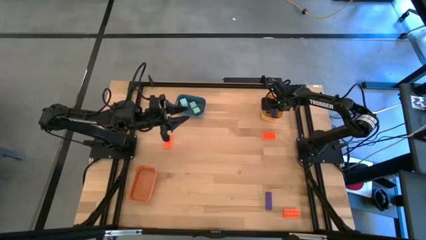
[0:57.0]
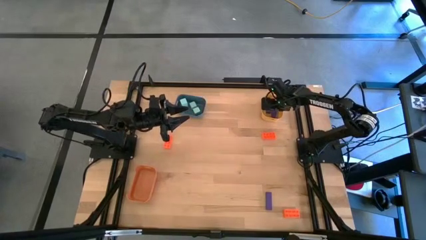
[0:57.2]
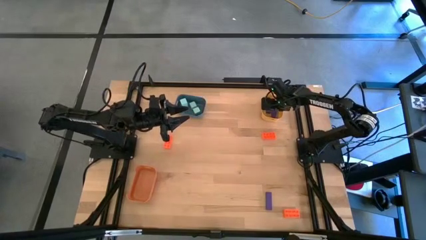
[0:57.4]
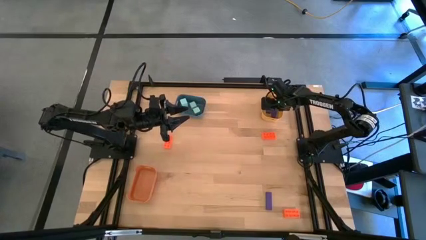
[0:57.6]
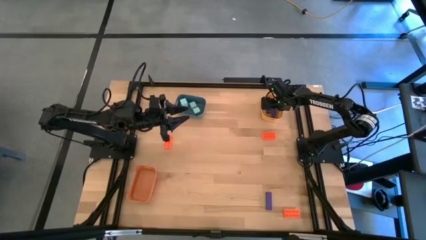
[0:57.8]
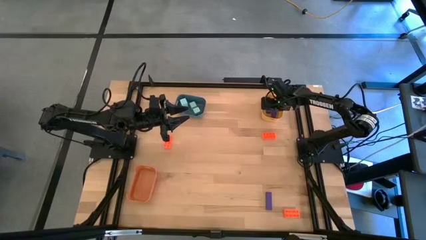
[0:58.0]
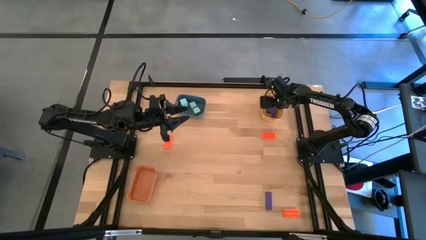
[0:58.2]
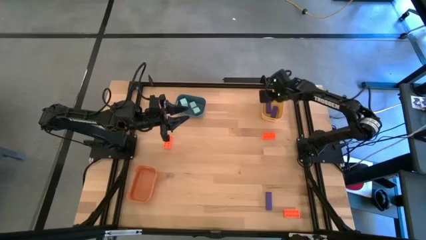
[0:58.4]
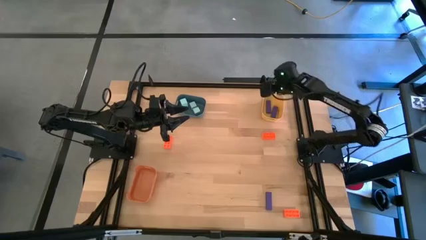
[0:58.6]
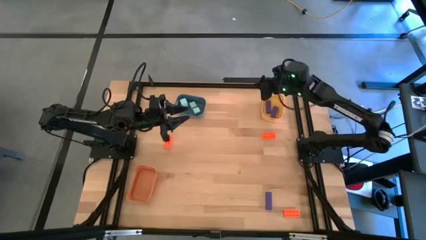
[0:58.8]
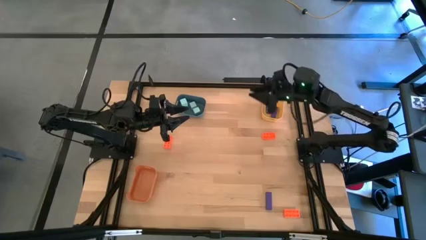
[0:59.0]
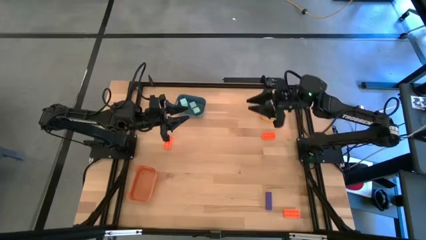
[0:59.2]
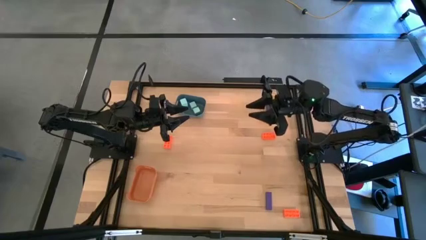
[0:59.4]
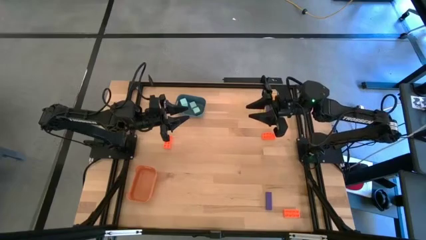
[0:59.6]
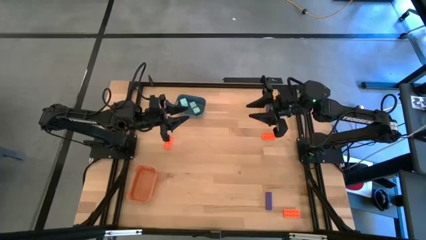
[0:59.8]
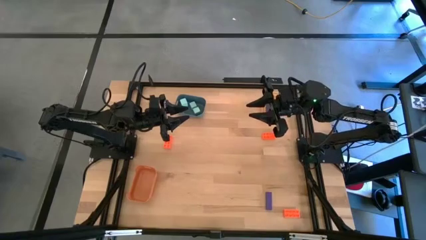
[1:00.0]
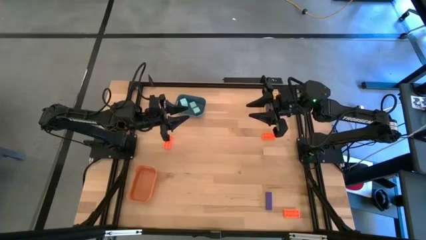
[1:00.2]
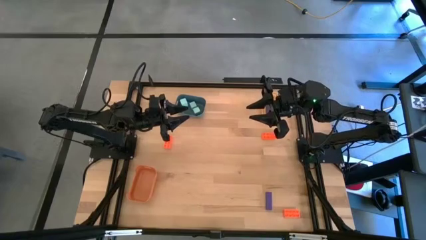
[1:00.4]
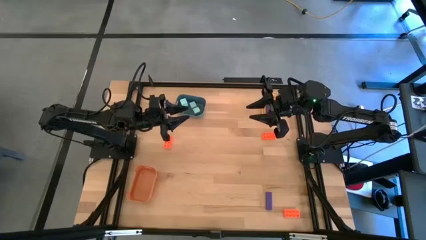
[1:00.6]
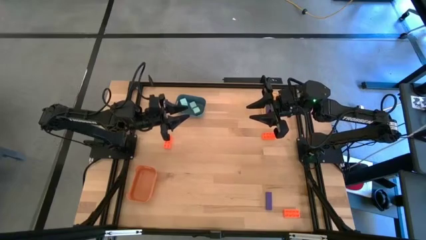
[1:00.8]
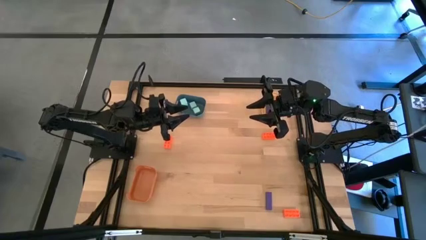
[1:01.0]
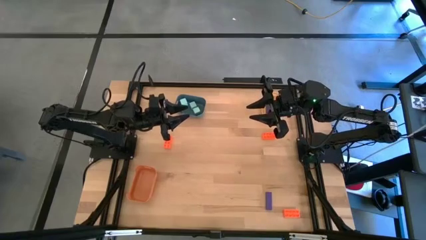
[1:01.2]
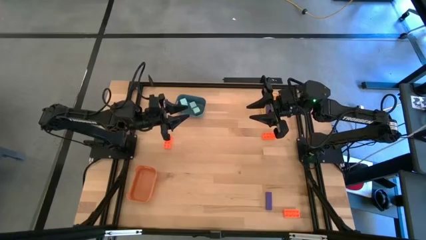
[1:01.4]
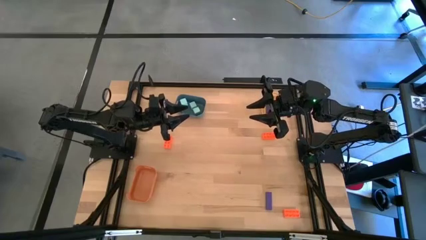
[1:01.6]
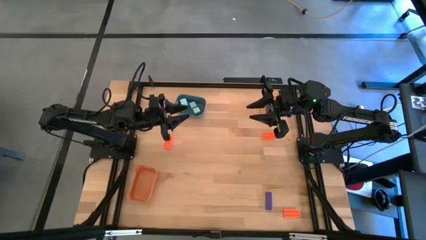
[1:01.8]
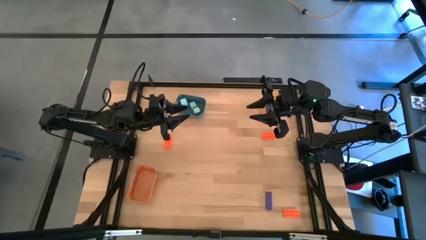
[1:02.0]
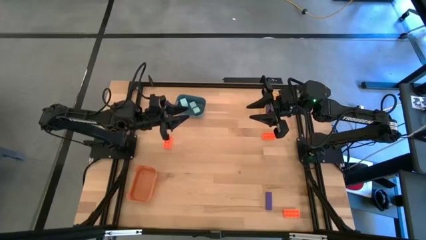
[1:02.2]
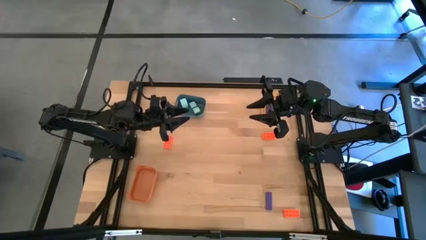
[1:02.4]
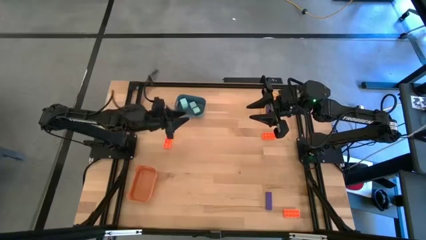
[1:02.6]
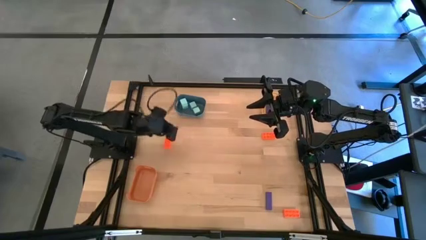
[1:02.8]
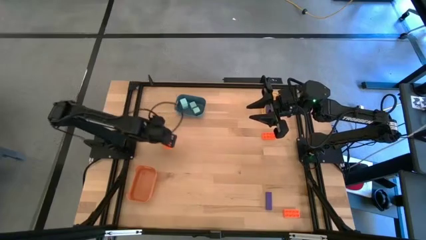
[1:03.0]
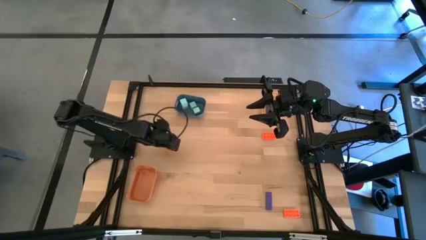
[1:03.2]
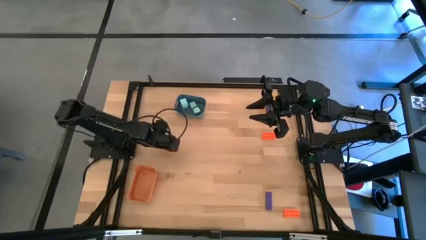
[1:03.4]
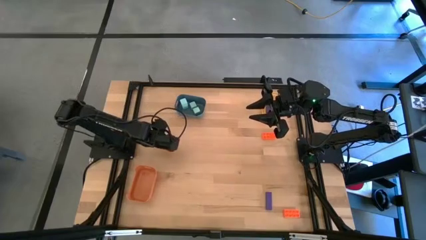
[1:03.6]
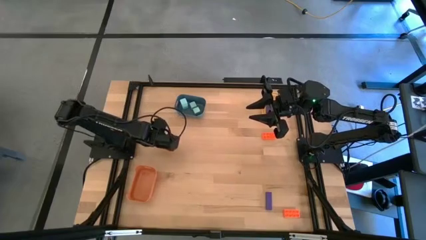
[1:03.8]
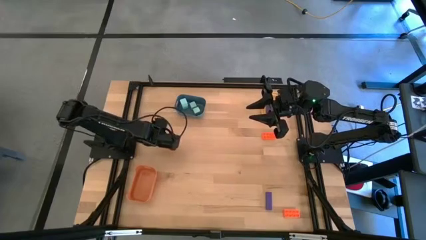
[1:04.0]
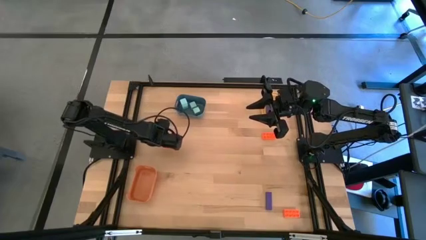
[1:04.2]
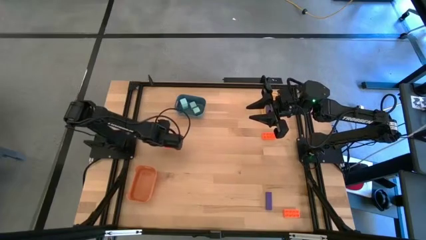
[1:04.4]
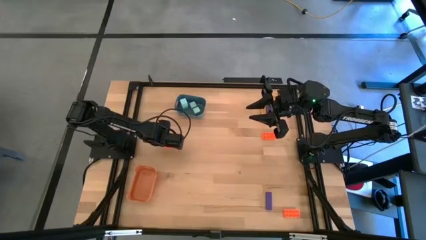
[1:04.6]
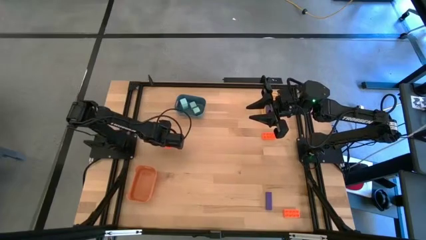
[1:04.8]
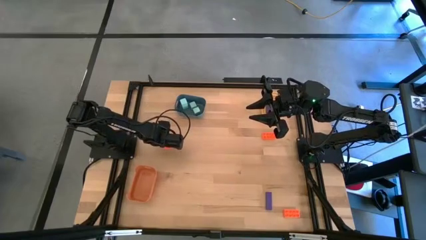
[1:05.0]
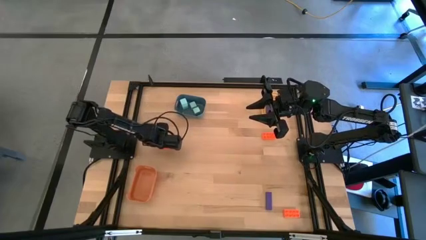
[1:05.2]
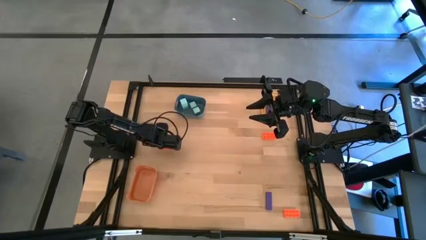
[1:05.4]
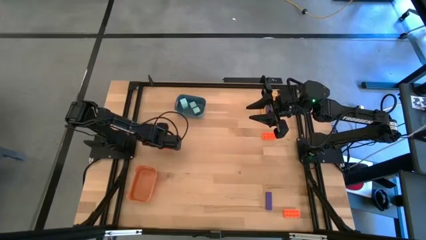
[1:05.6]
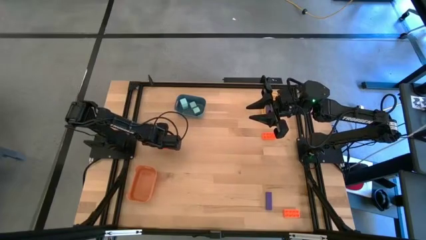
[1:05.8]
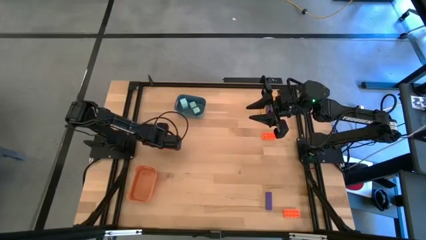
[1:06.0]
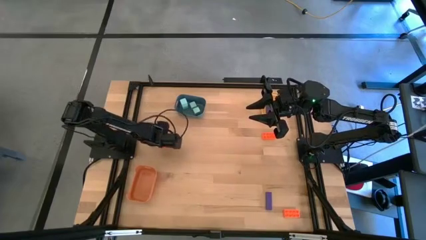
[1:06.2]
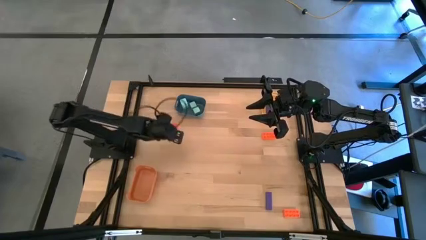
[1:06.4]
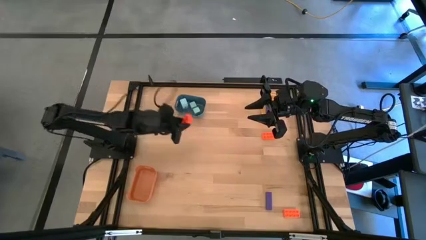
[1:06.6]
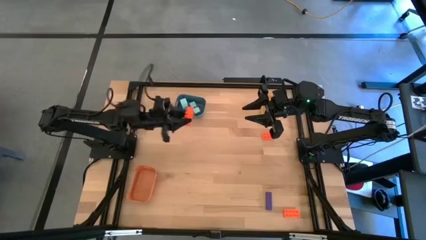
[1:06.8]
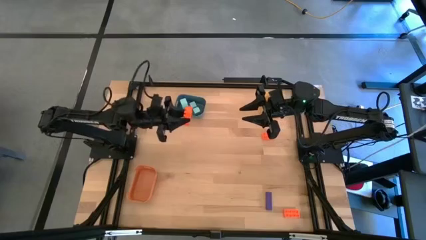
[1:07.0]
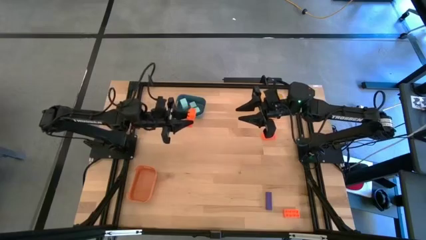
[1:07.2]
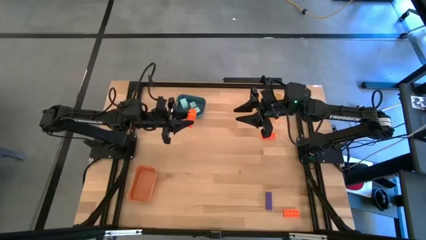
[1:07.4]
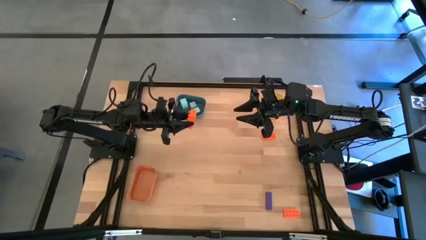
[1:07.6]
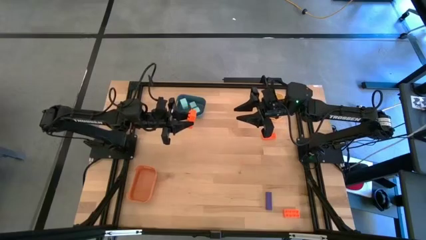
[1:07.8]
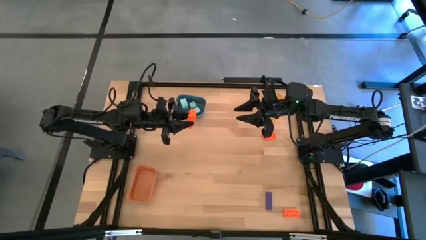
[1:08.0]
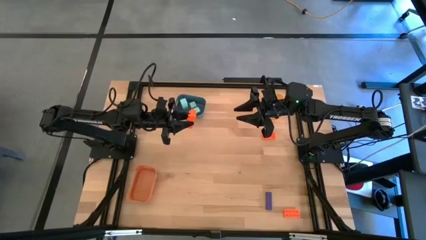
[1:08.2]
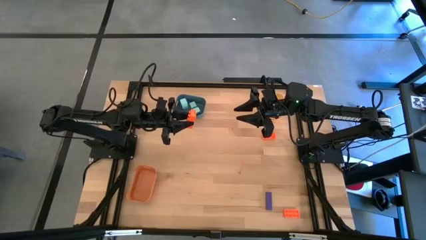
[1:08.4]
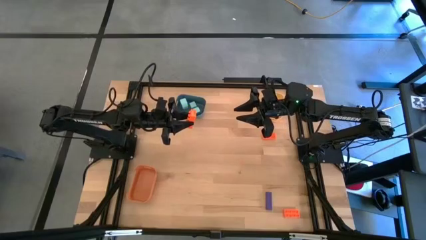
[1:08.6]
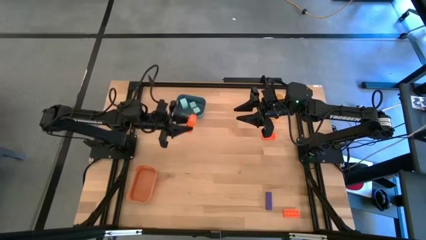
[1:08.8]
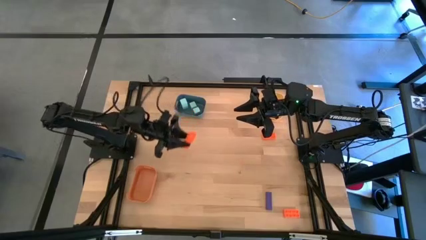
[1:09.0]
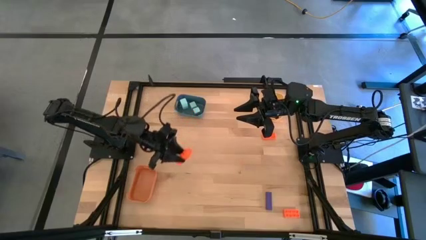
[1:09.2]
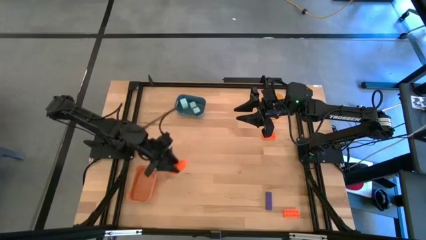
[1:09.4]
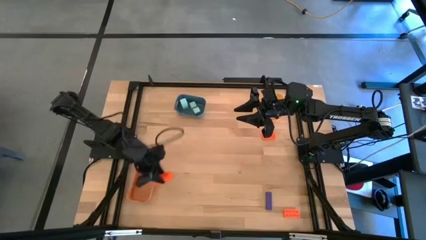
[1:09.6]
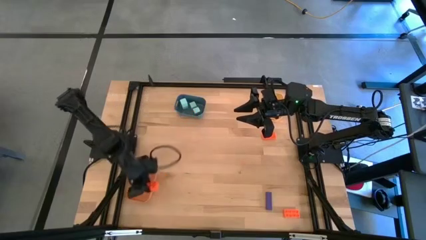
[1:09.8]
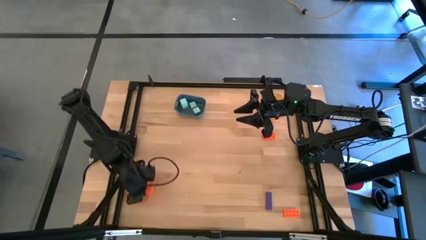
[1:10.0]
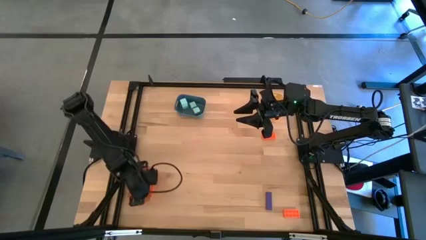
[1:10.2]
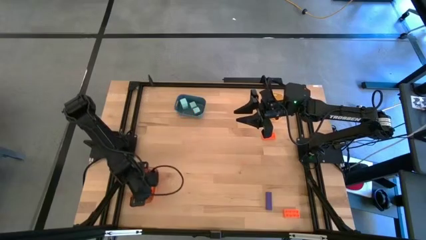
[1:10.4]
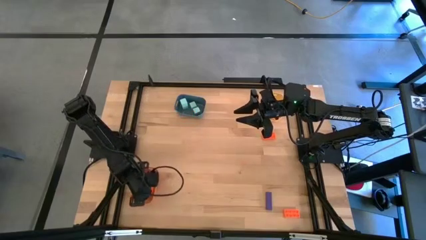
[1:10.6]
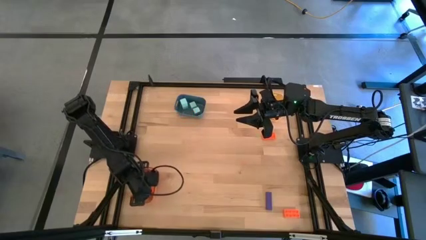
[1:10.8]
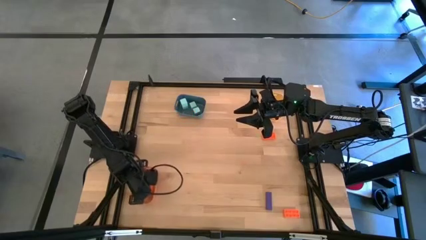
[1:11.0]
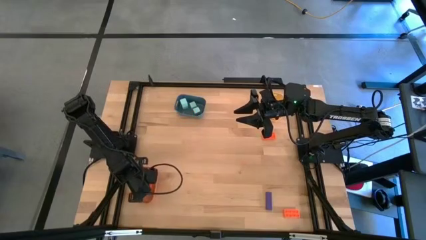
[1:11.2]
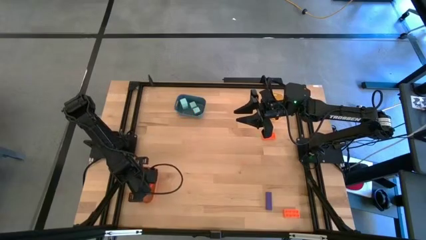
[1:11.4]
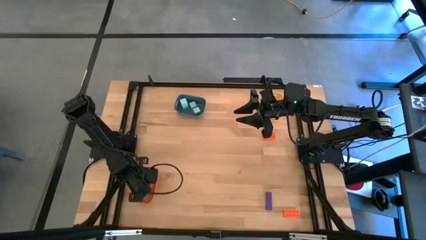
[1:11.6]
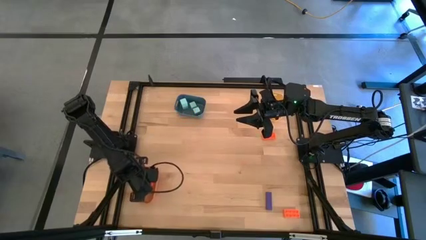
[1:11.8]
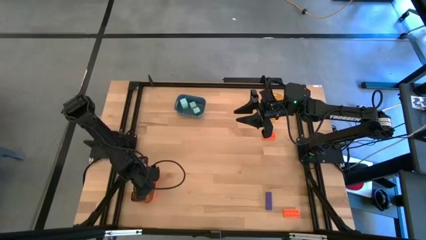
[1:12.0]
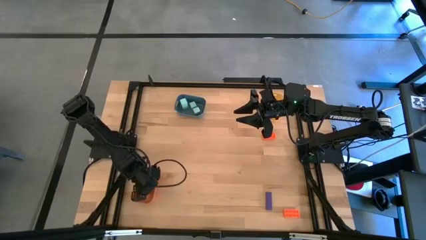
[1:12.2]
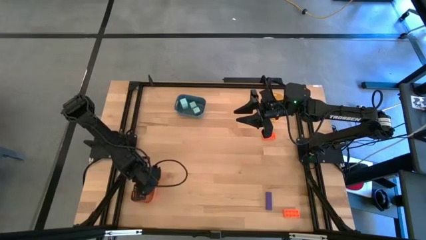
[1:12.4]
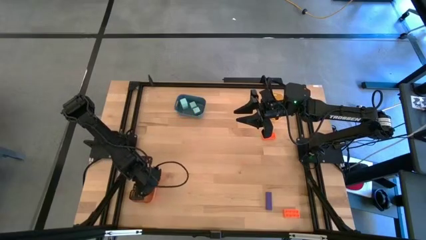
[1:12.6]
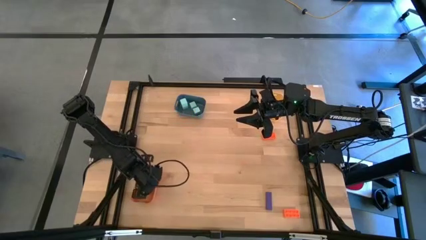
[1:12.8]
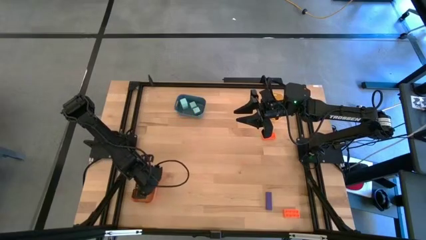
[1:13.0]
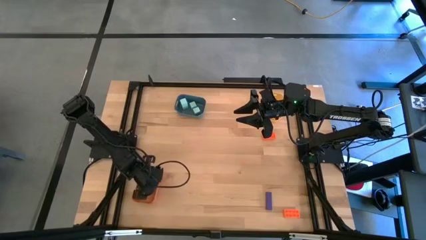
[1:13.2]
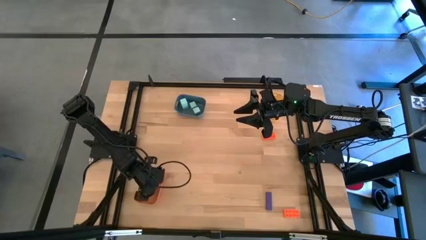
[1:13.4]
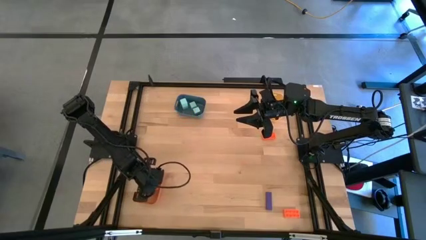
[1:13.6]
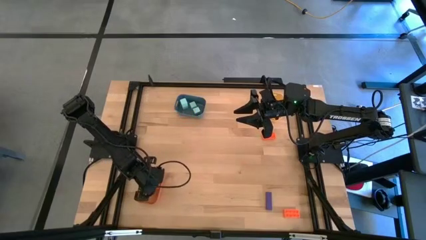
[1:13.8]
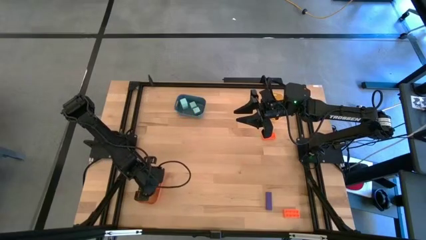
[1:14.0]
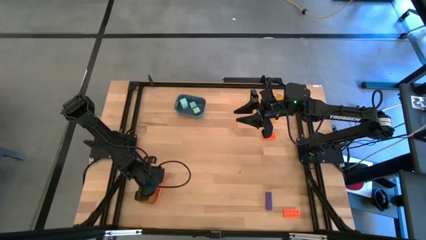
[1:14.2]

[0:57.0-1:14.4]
Task: Sort & place blocks by color
Put the left orange game piece into the orange bin
